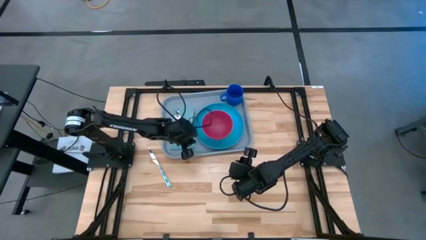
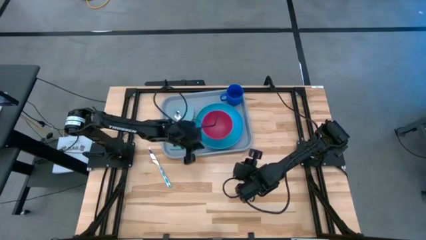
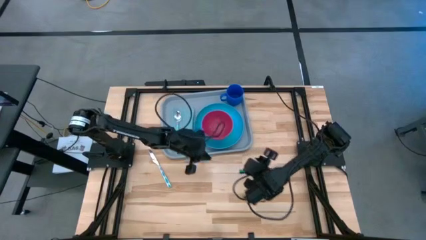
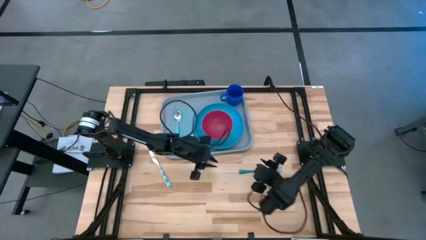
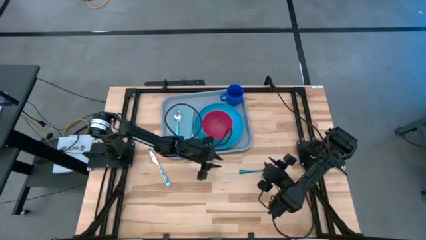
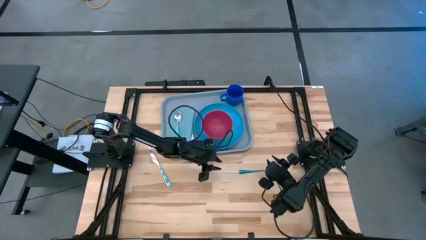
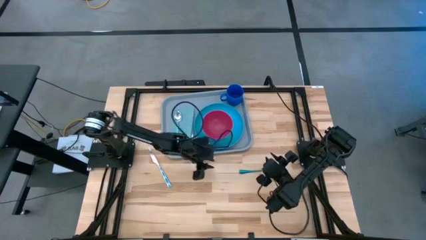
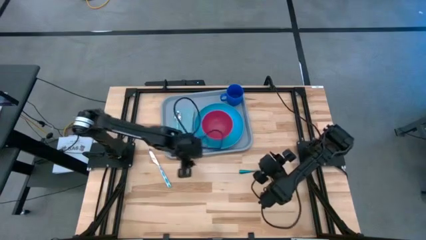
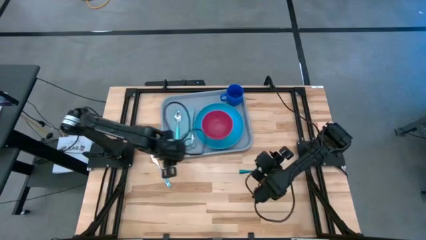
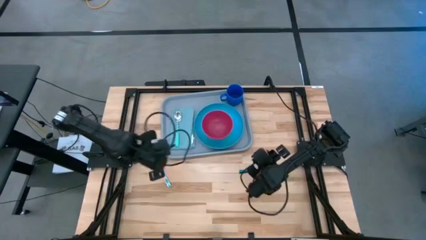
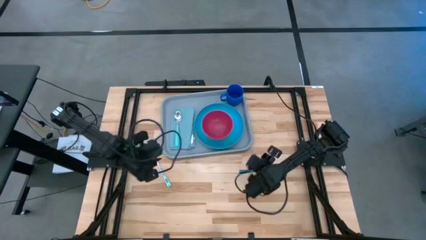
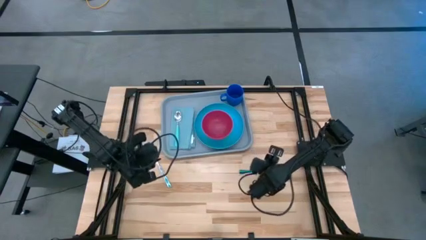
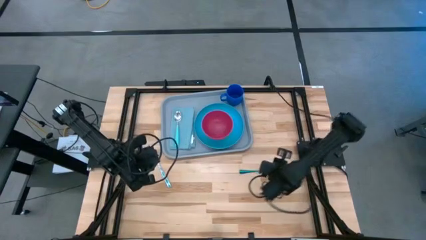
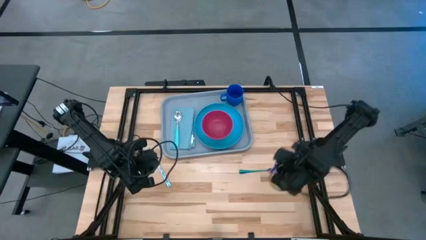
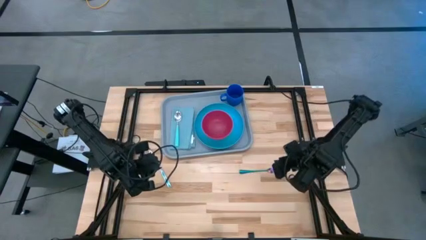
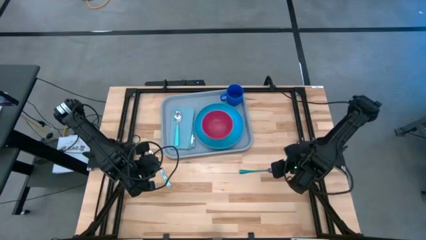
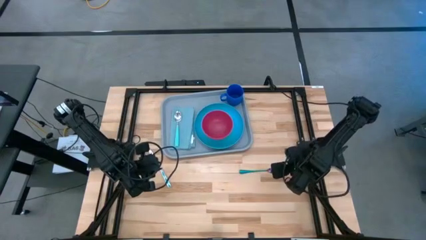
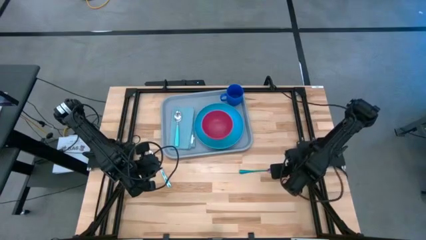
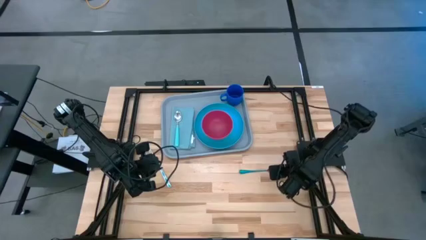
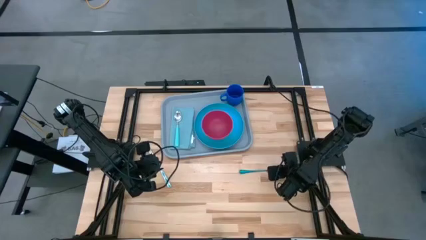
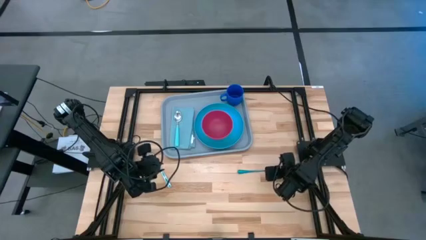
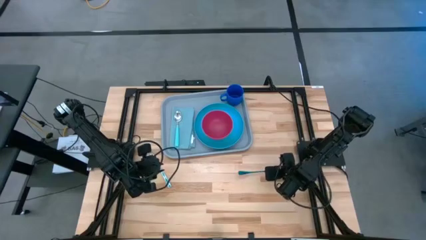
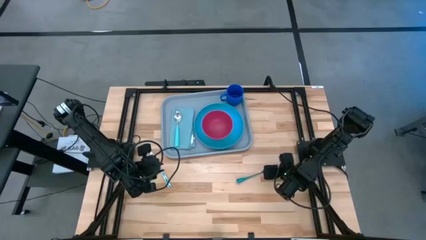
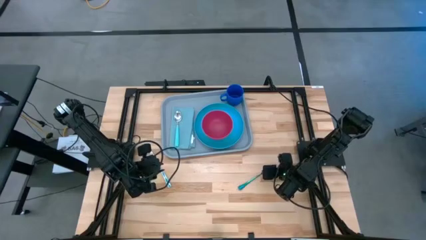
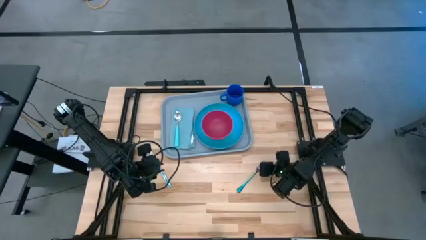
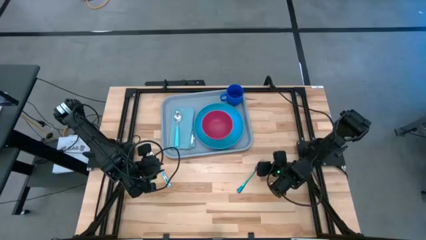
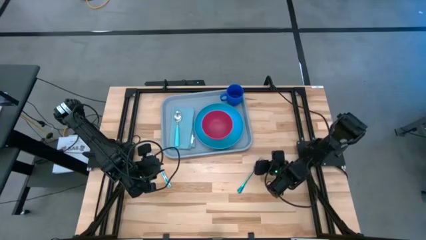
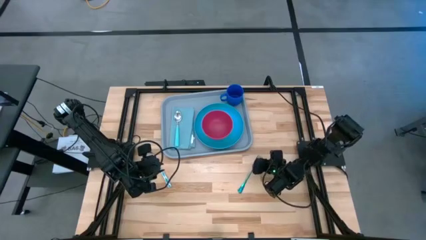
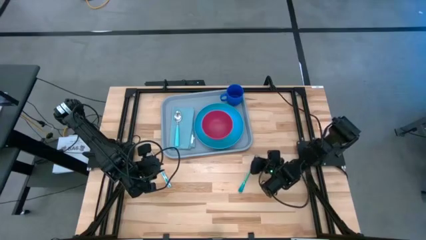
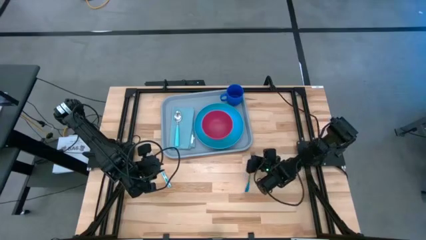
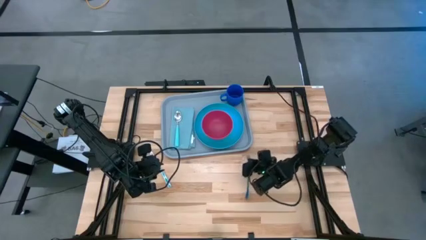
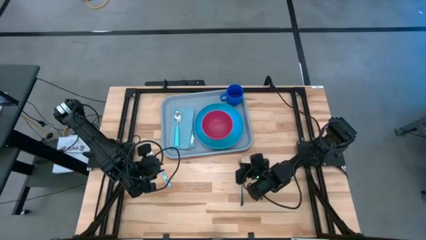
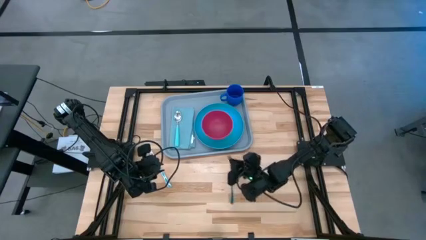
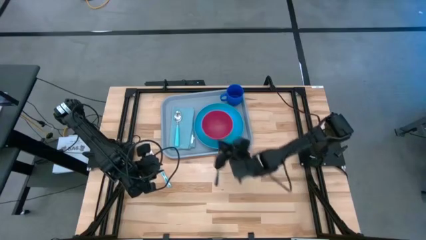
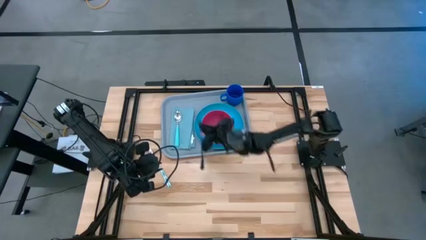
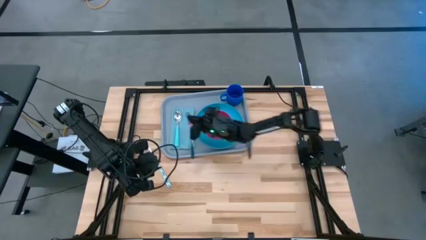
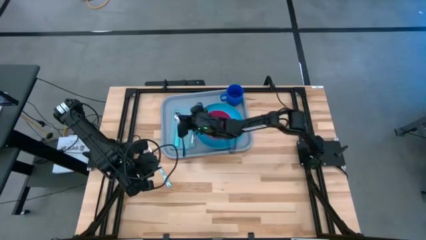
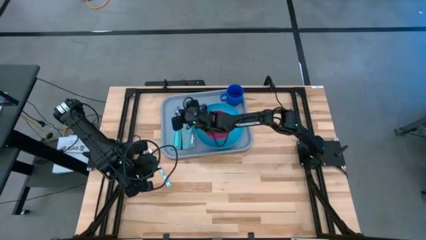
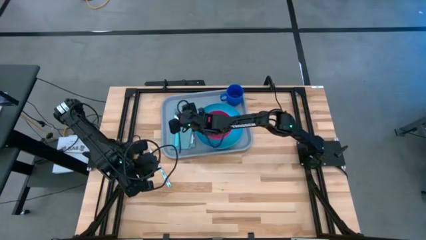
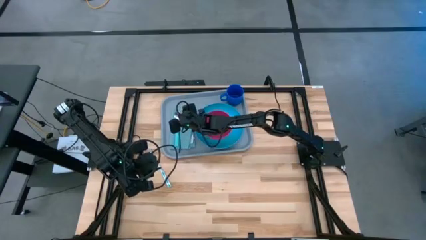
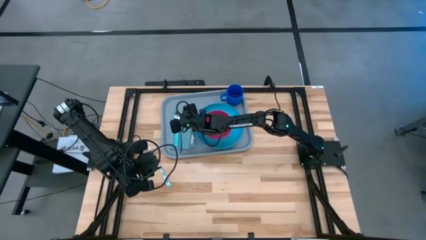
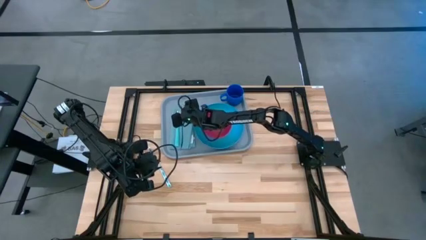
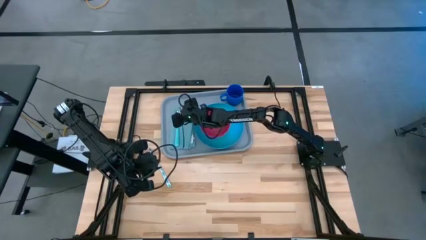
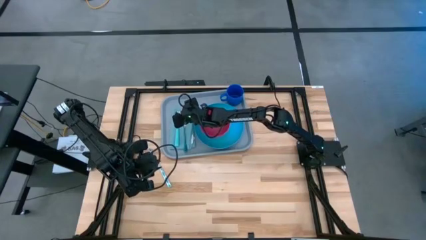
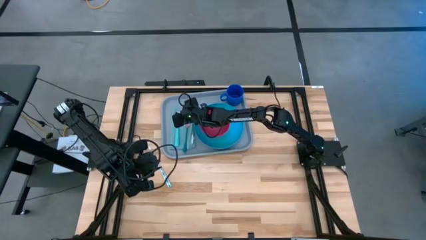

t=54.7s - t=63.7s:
Task: Set up tray
Put the iridescent fork on the blue napkin

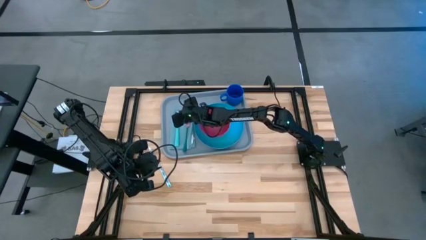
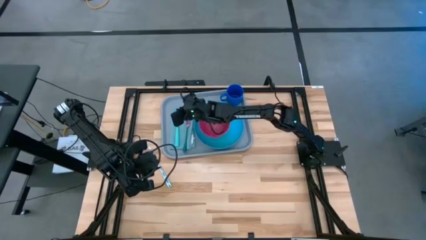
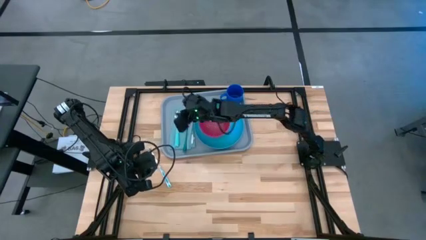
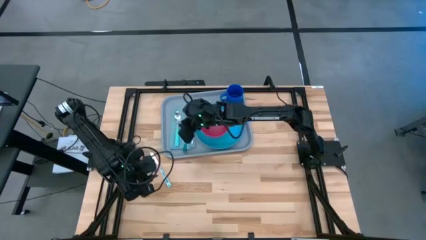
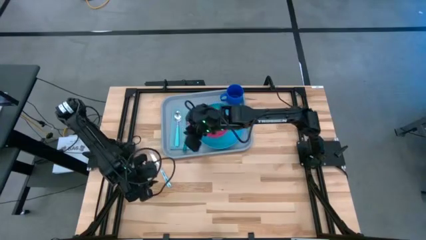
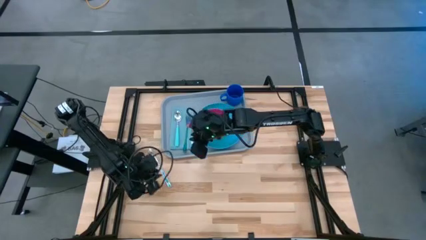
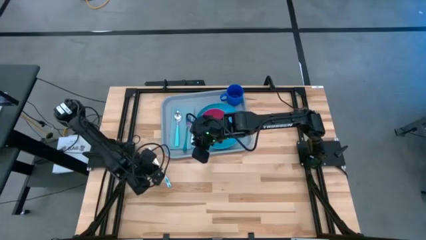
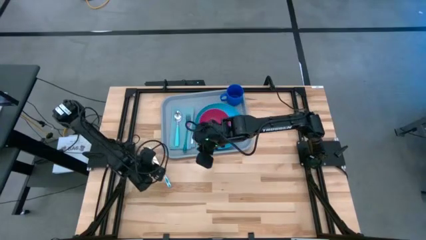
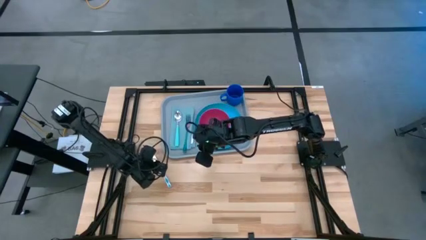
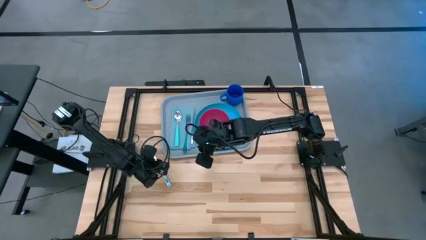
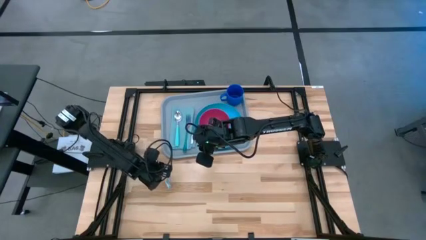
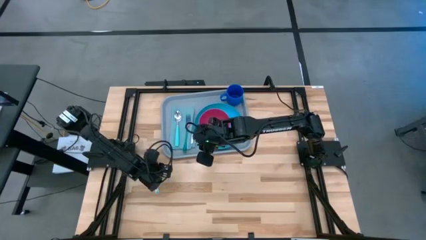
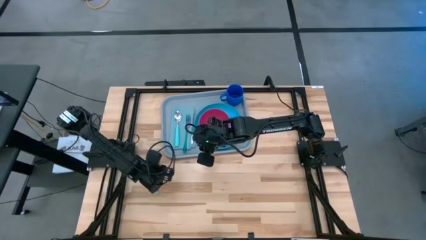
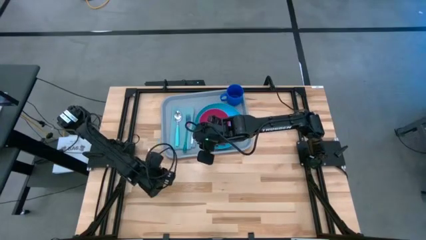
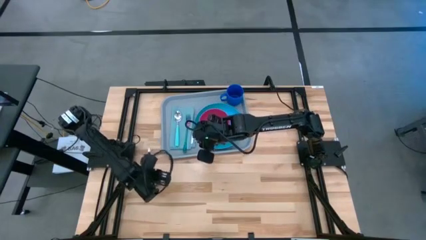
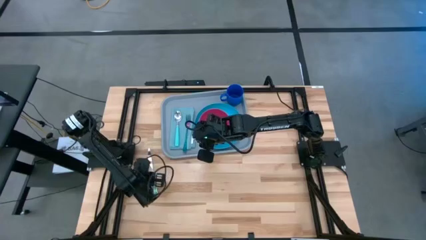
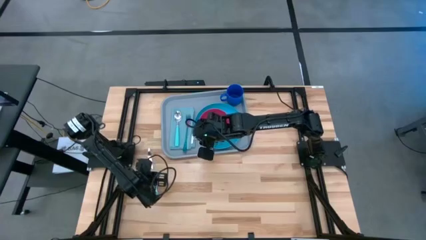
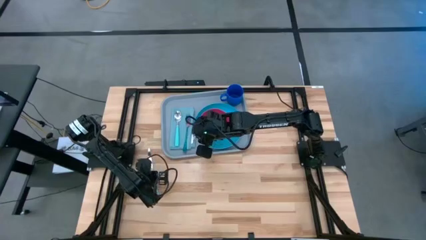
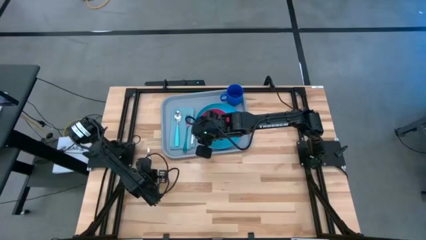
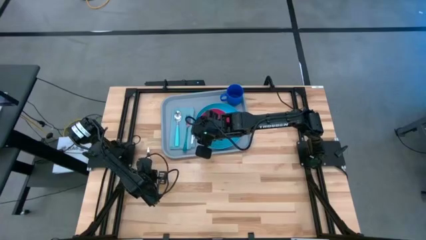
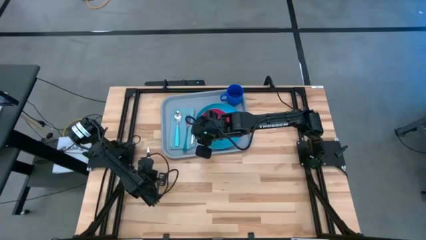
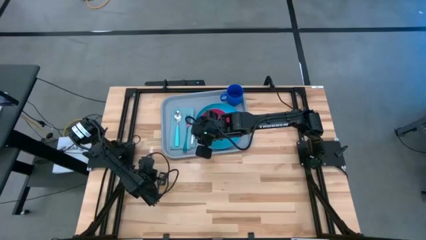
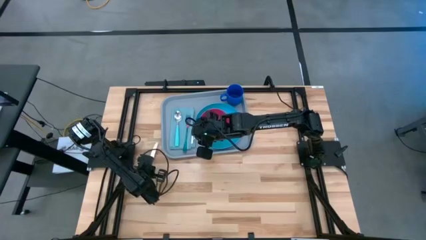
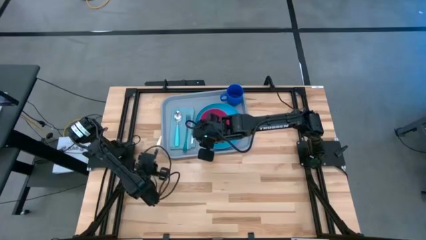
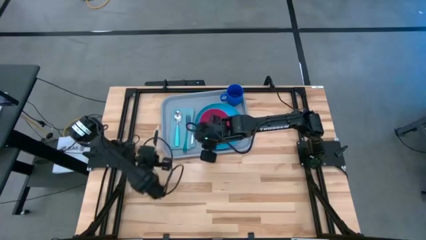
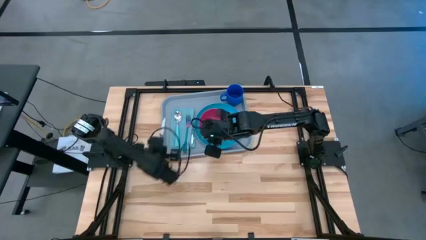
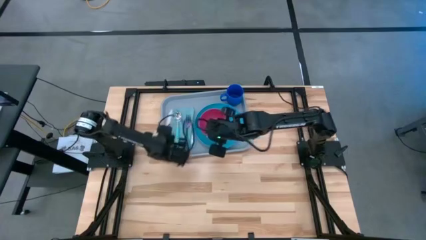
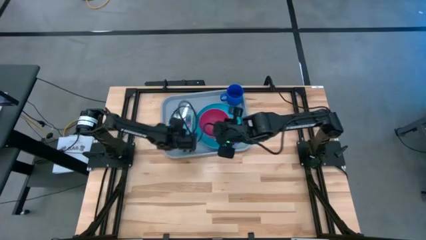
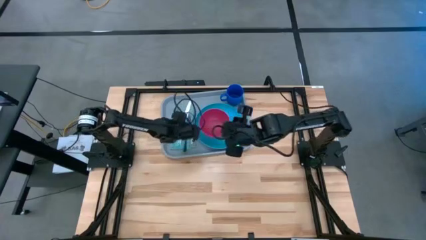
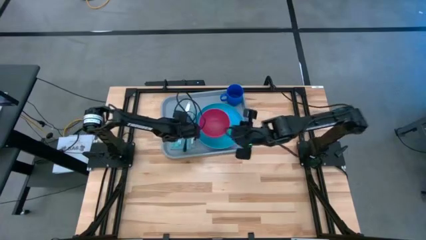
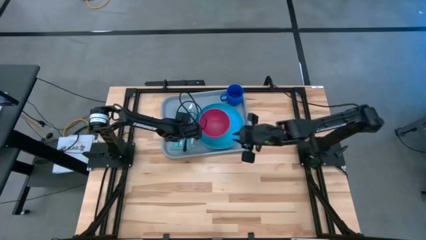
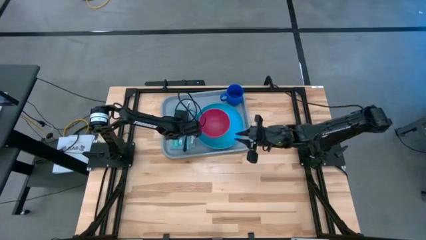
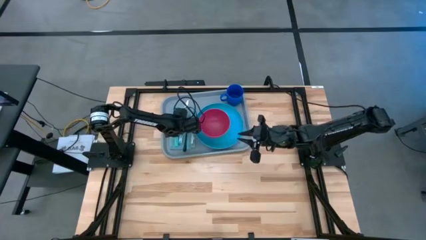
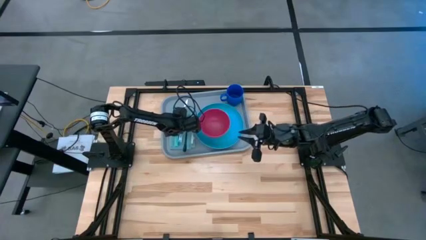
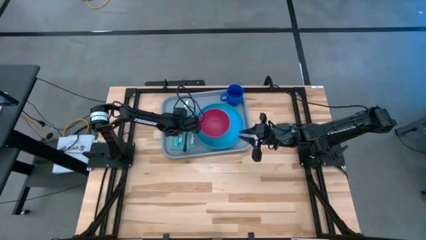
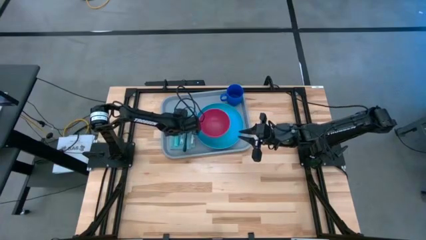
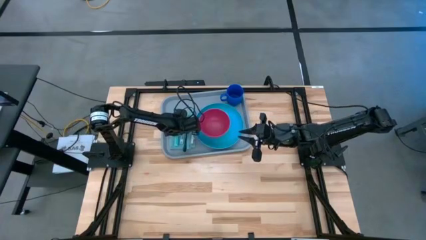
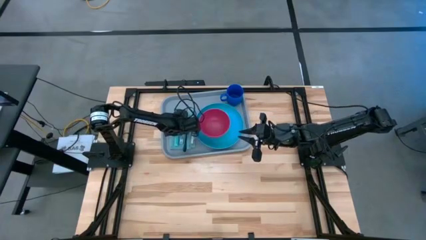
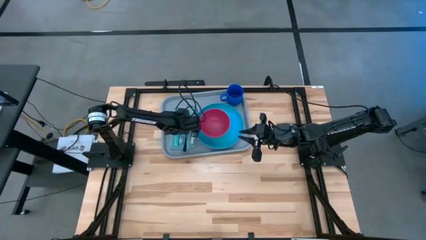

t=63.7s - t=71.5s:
Put the green knife on the blue napkin
